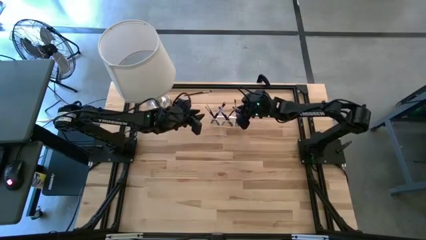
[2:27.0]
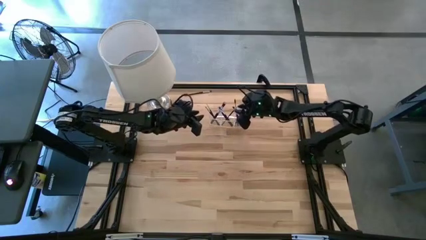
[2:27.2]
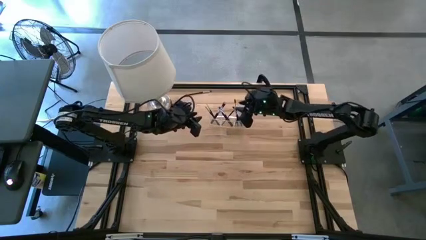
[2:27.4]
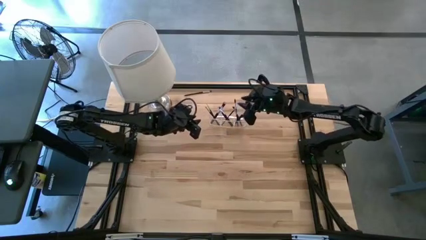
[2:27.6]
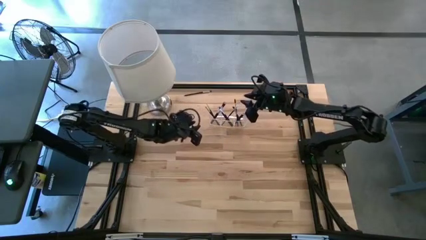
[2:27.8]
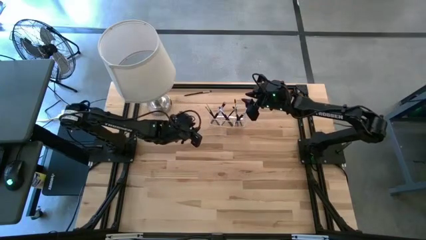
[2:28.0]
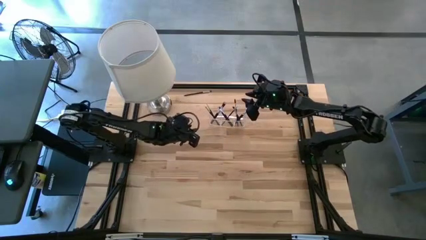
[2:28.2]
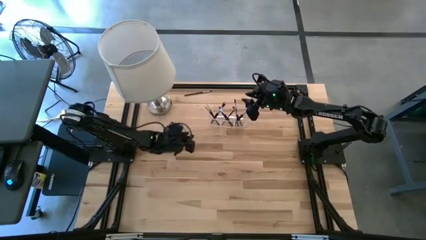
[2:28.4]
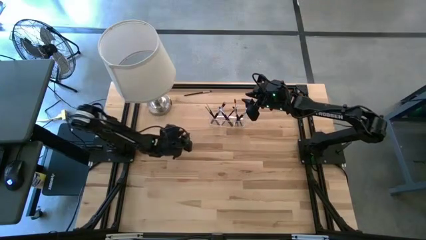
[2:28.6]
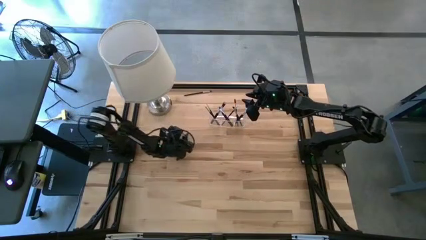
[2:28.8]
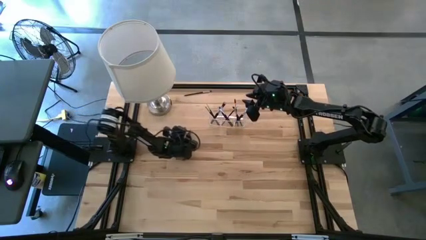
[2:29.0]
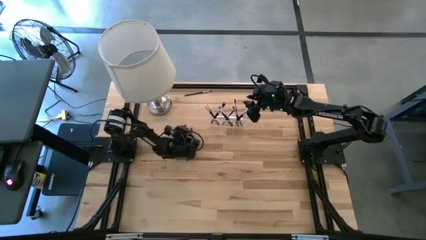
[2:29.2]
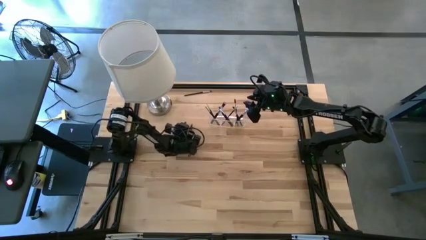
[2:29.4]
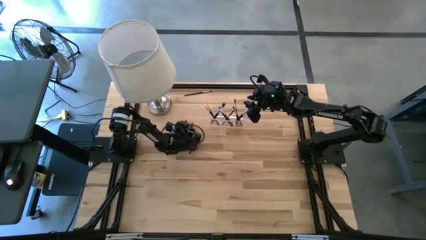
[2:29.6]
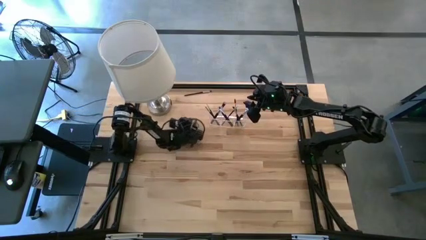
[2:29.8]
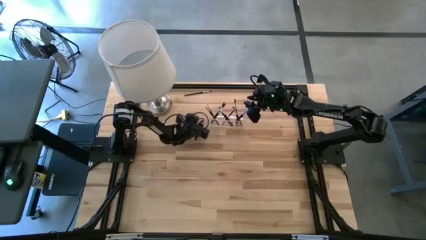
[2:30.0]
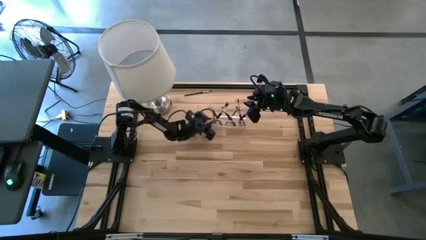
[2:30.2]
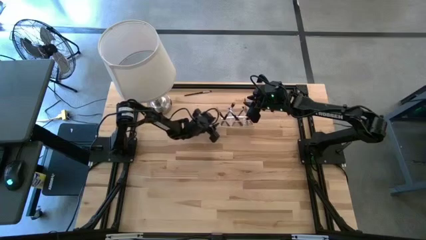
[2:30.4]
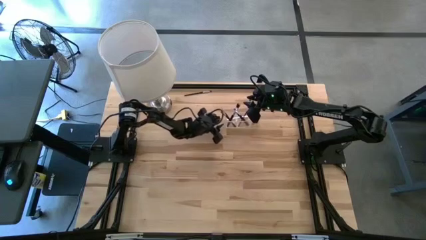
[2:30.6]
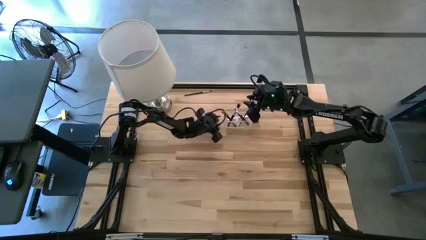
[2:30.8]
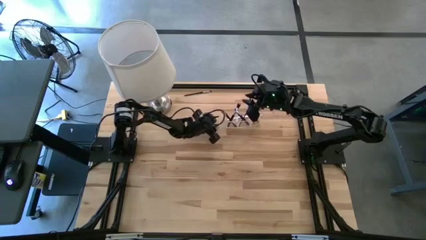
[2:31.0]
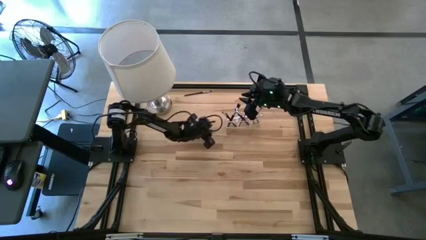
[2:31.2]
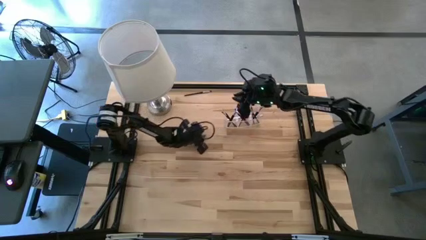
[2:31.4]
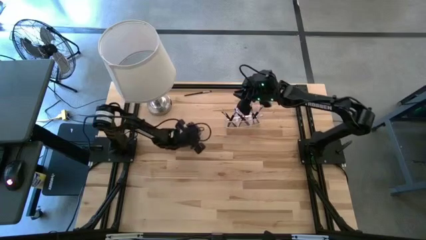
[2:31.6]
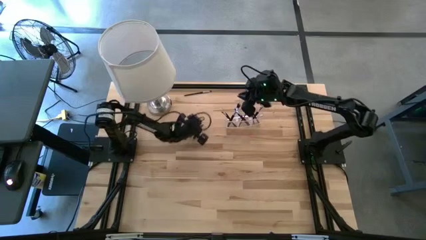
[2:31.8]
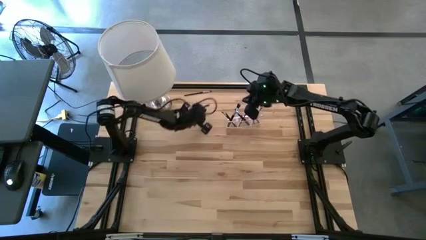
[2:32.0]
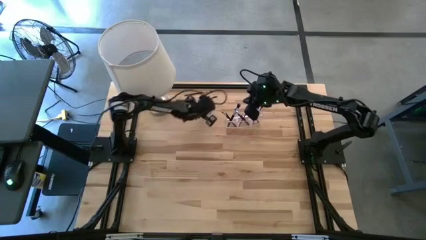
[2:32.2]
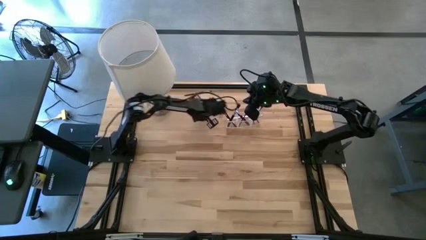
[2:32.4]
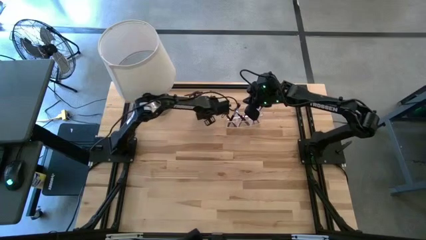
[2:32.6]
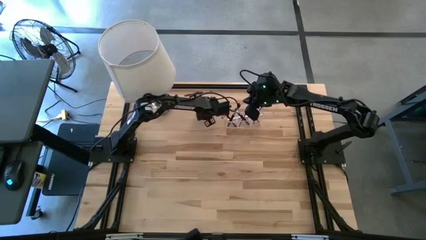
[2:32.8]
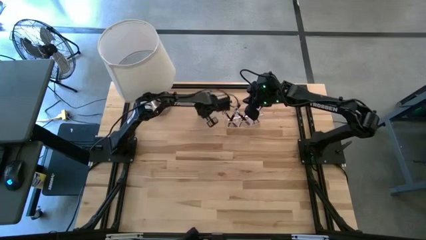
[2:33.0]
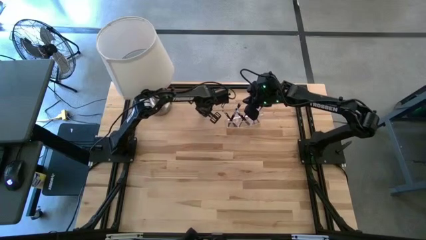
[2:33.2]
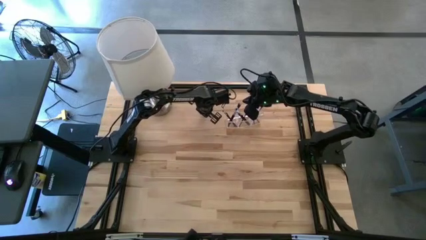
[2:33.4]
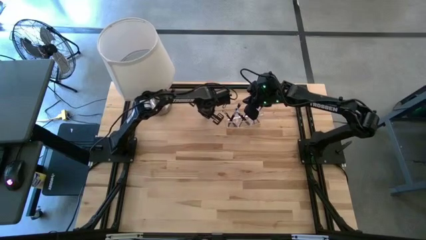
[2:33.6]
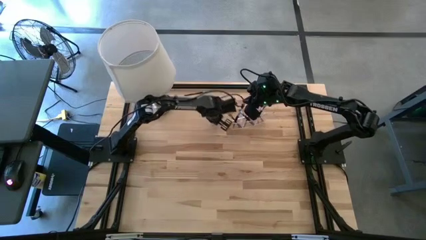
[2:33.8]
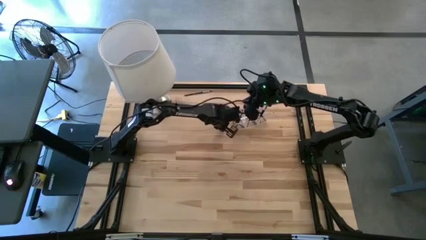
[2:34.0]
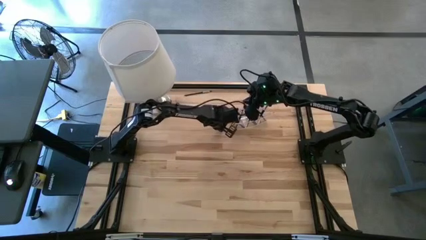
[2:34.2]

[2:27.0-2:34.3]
Task: Put items in baskets/containers
Adjust the transparent organizer

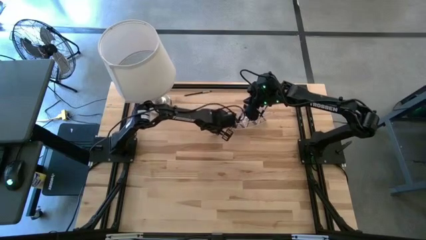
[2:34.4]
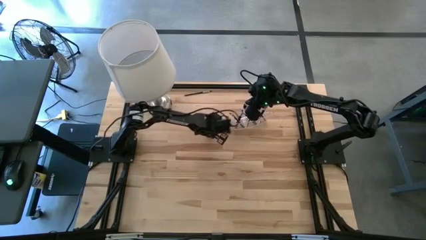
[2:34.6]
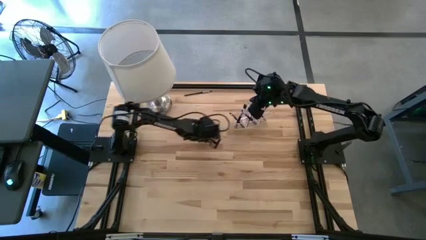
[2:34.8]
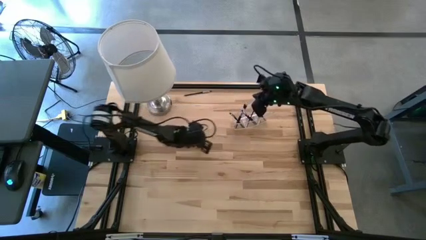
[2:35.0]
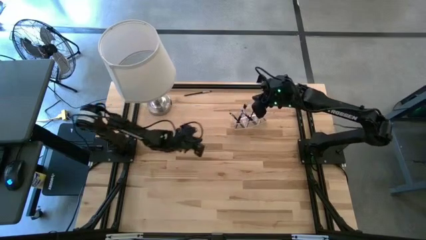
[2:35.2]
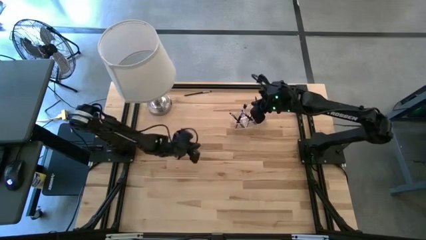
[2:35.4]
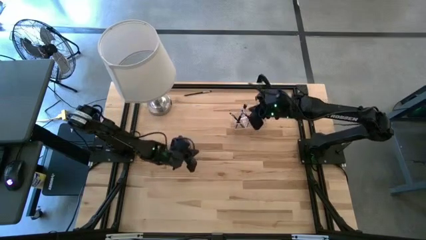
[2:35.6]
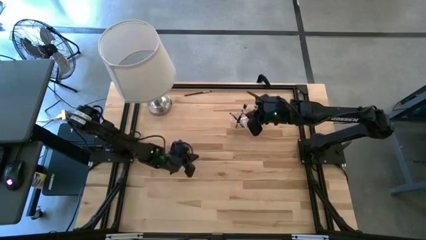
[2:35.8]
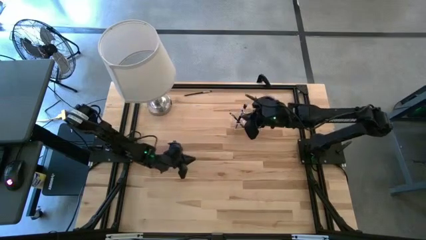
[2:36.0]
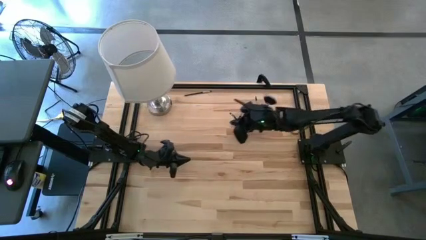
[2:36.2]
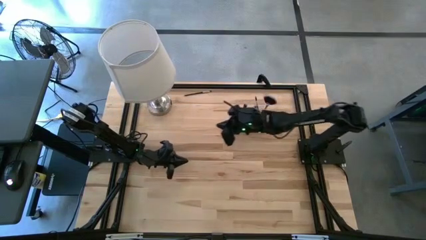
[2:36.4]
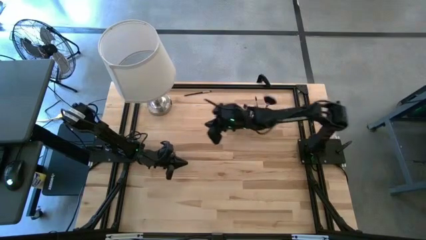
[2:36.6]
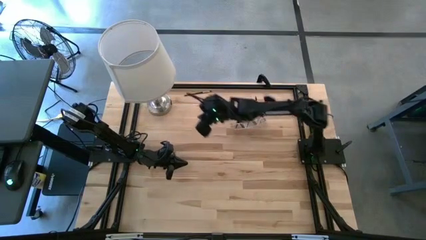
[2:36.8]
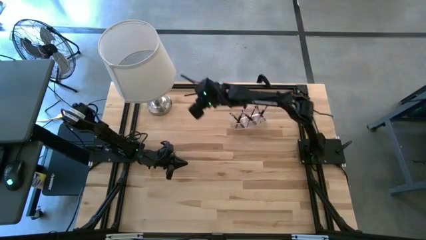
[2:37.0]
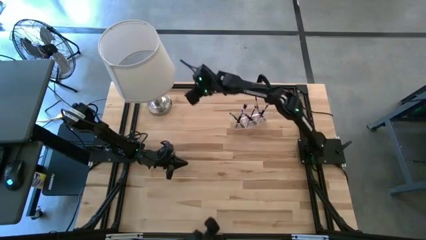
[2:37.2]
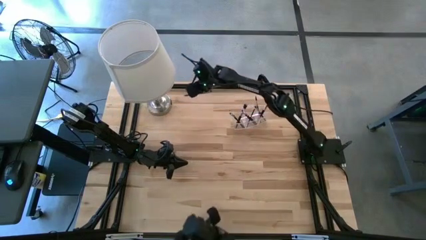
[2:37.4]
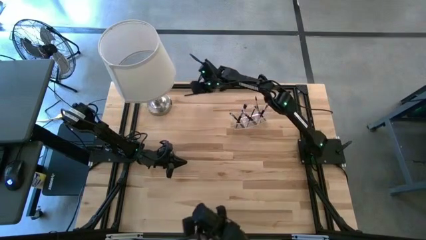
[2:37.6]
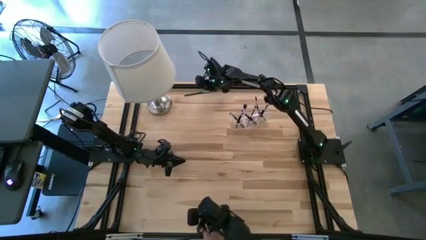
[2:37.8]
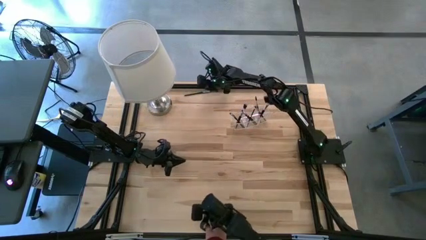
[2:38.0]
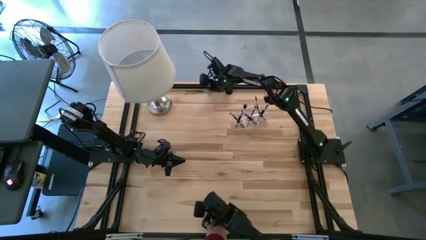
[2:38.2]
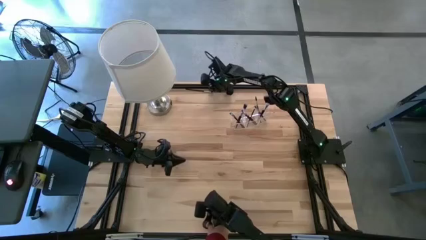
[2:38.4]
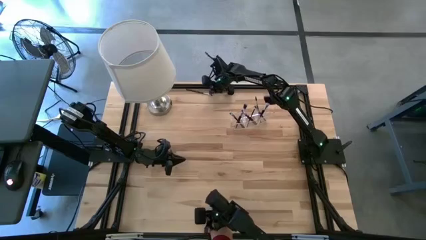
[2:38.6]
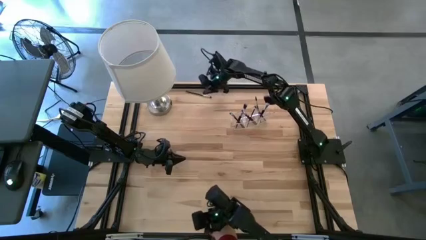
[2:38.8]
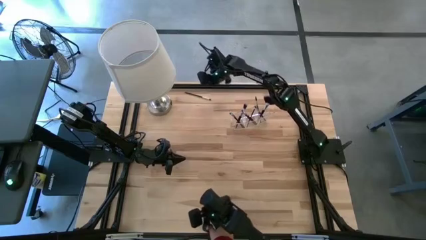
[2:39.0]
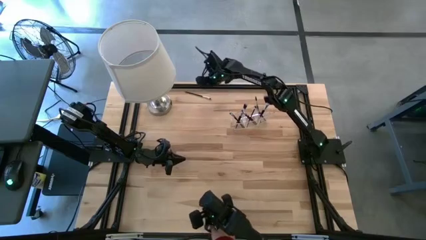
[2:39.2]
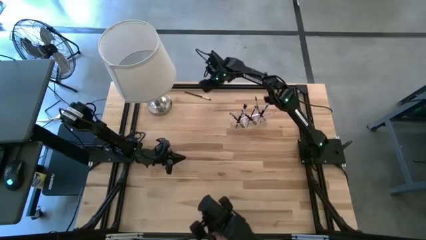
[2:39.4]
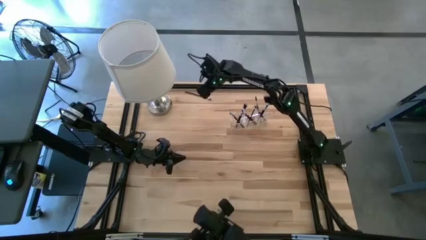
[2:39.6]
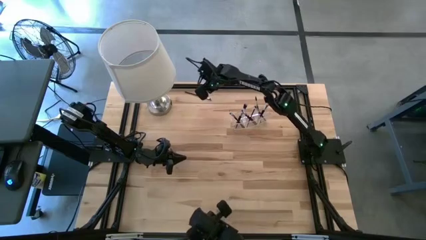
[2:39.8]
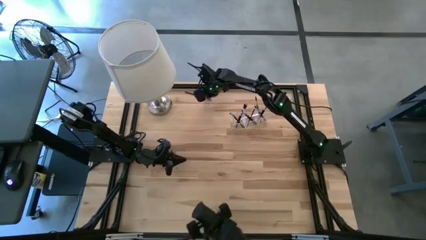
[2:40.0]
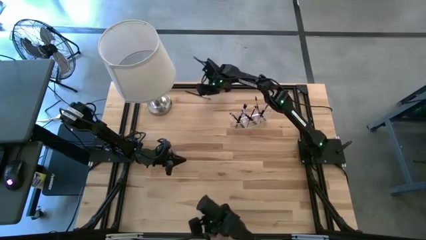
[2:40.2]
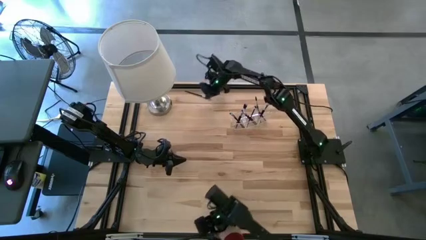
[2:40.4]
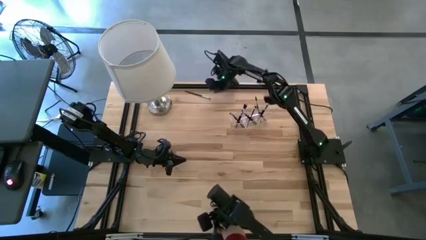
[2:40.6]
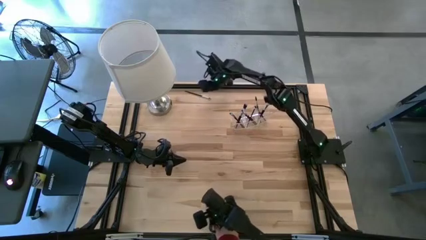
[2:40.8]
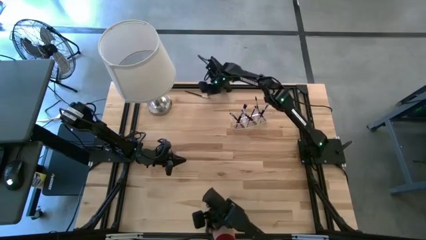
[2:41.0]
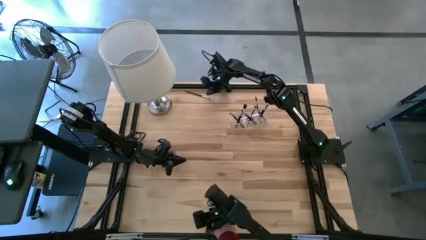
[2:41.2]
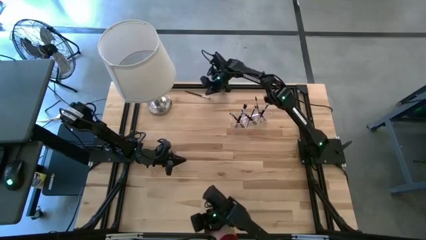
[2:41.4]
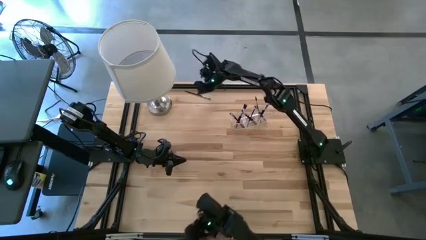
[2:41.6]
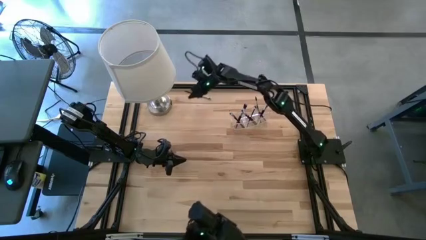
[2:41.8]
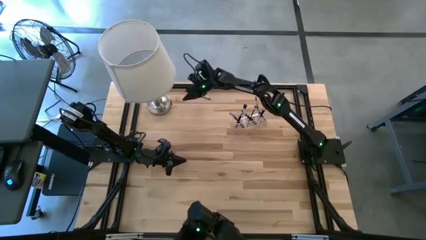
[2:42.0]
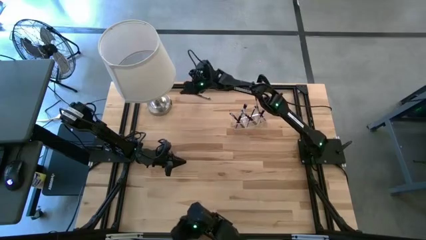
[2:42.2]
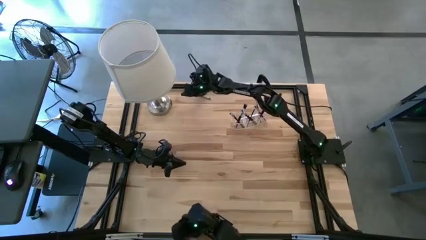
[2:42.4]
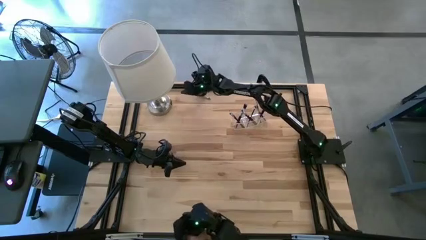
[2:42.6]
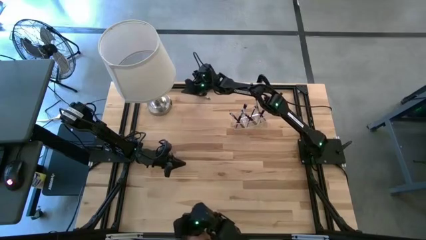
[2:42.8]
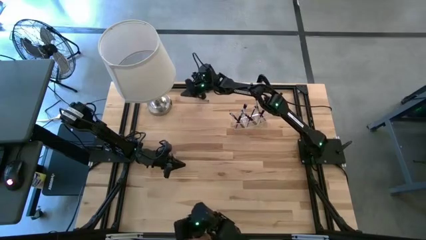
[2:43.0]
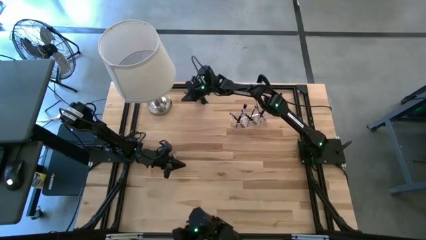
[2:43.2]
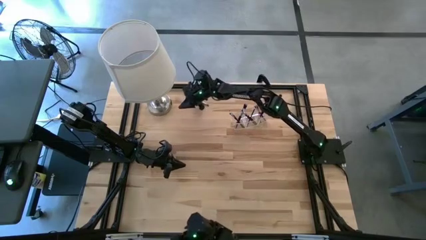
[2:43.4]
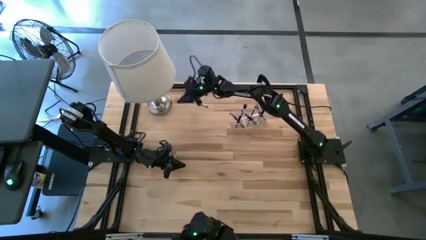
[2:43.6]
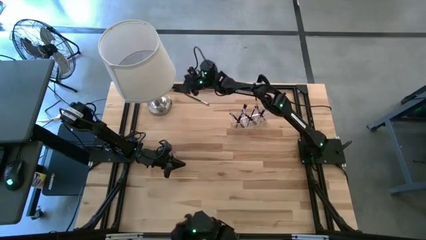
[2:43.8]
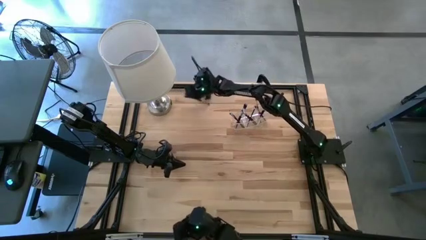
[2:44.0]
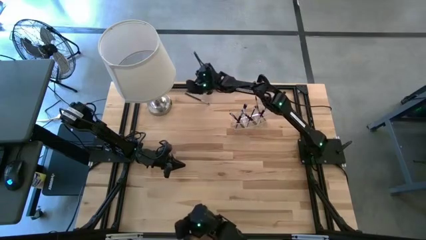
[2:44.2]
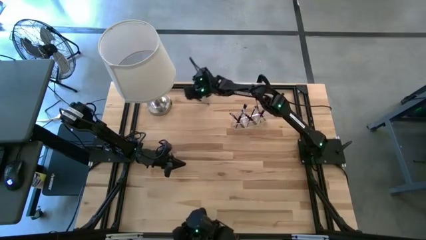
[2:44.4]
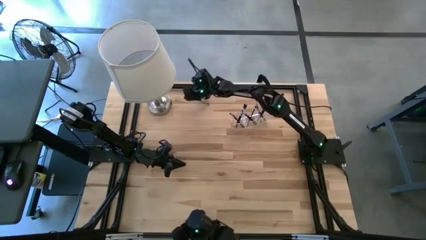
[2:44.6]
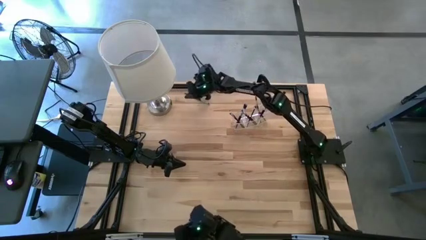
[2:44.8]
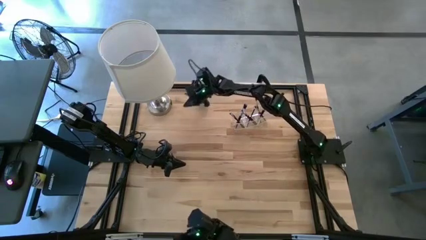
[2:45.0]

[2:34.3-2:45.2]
Put the eyeshadow brush into the transparent organizer
